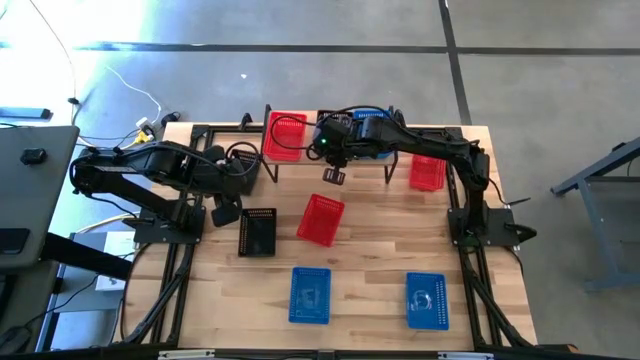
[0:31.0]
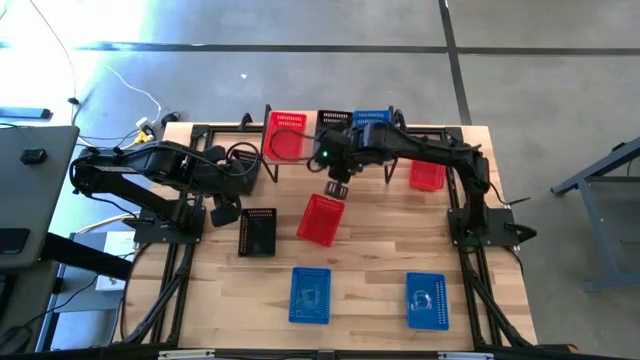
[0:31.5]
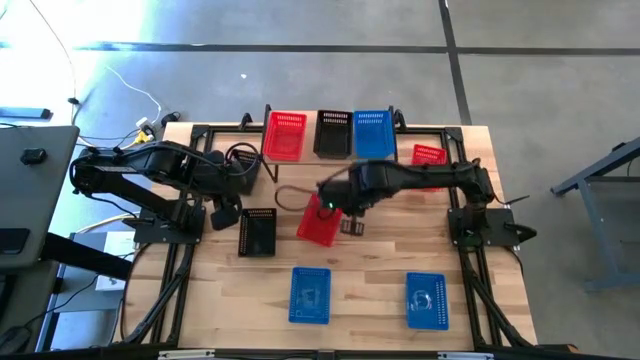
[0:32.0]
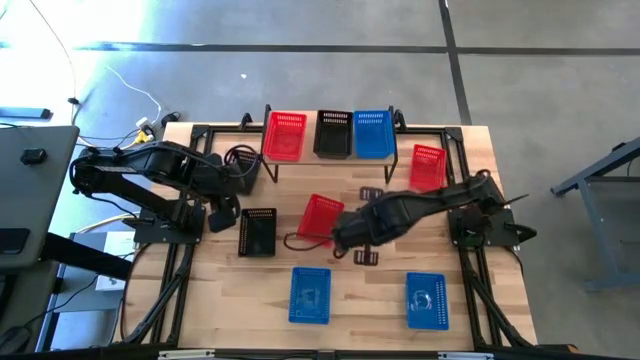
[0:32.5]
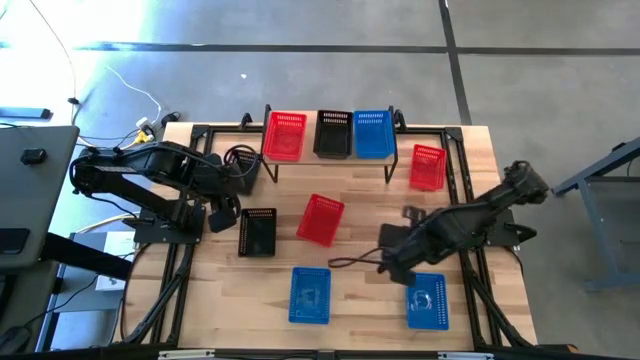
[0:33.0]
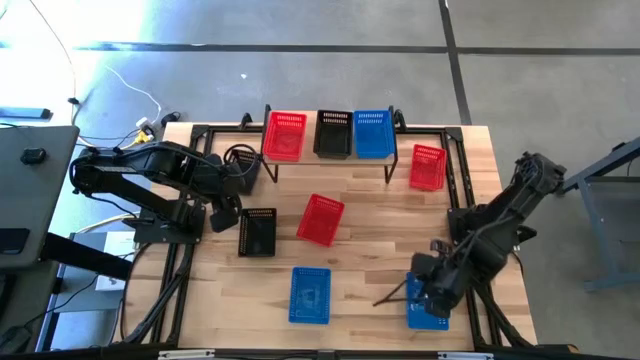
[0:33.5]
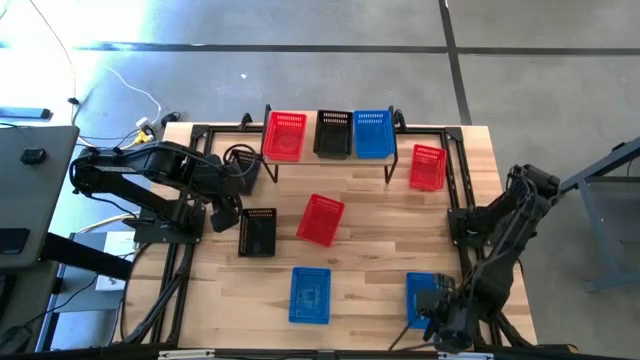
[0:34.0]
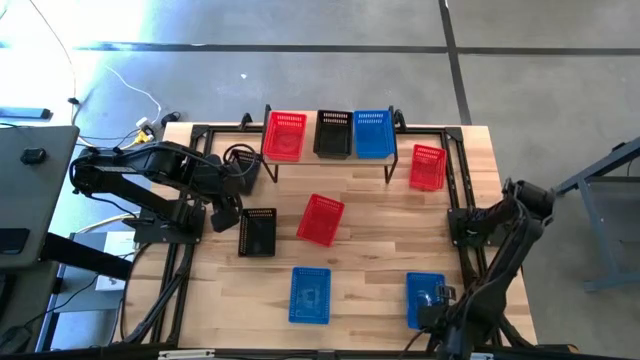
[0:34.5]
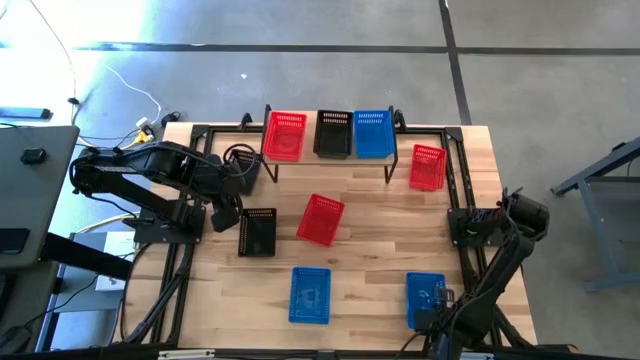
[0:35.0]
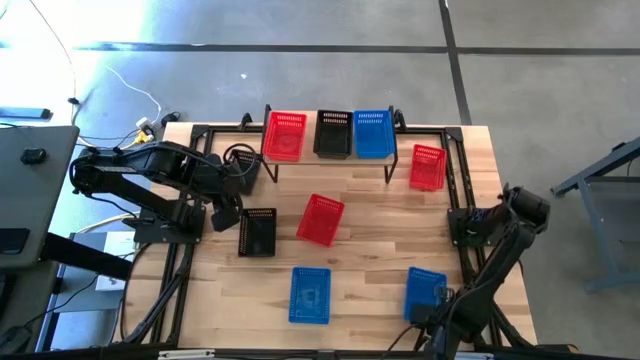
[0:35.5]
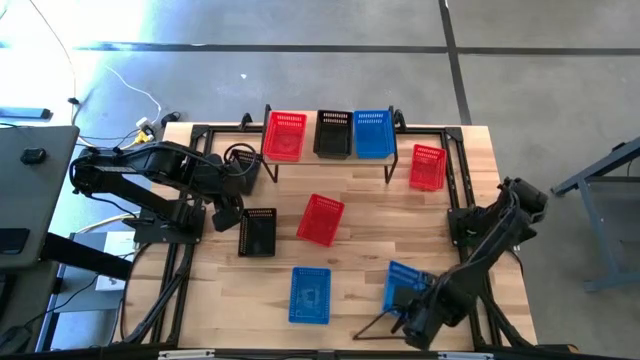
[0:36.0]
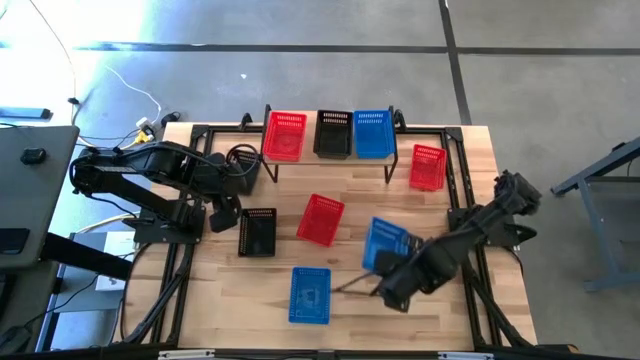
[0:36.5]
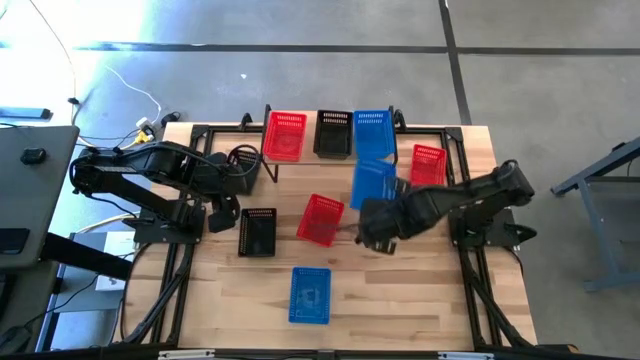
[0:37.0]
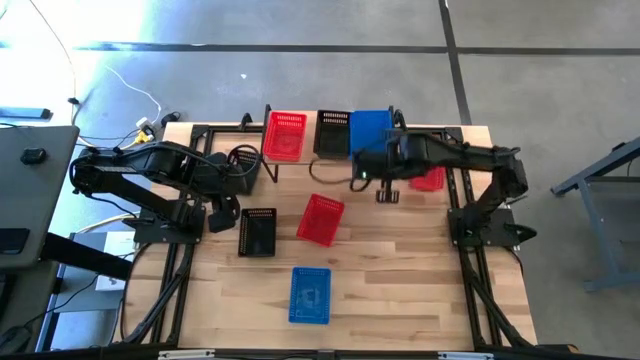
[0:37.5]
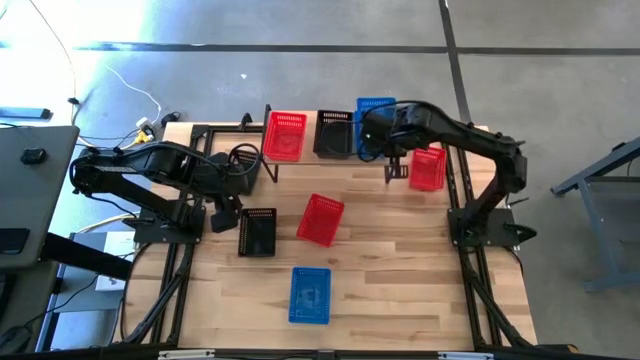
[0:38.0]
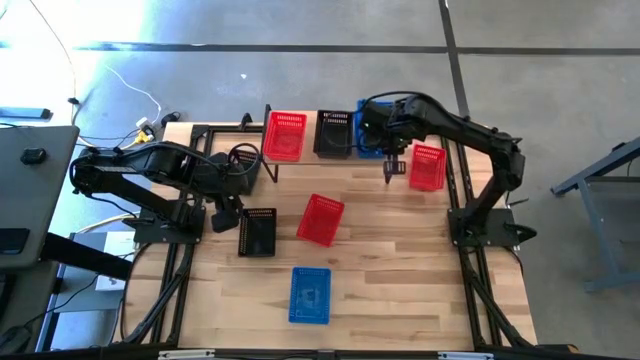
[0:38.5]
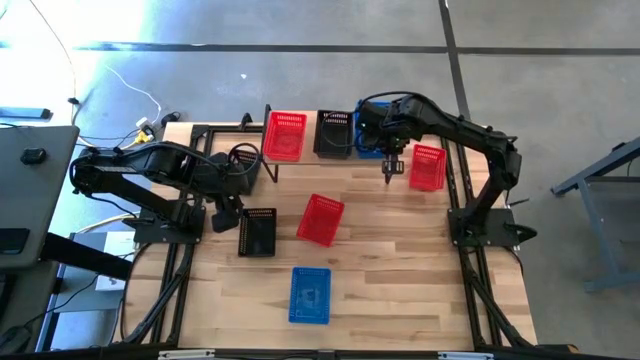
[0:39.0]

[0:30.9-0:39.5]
Task: Stack baskets on shelf by color
Stack the right blue bin on top of the blue bin on the shelf

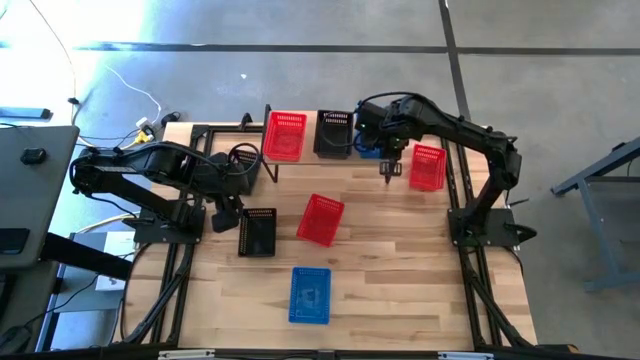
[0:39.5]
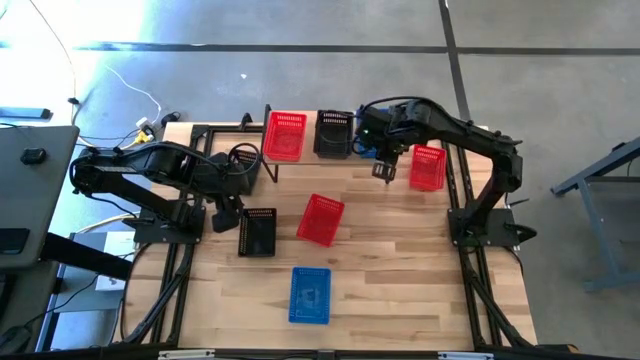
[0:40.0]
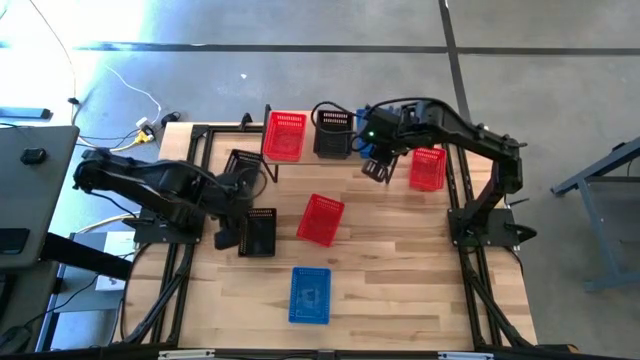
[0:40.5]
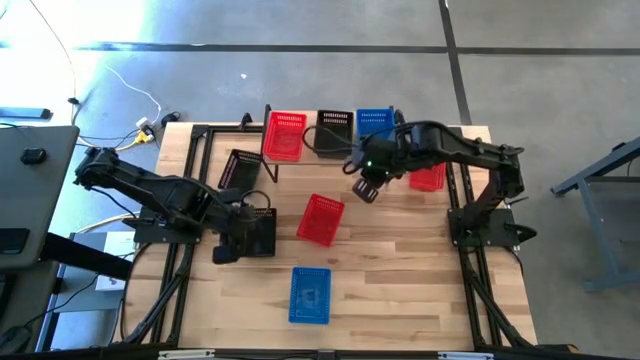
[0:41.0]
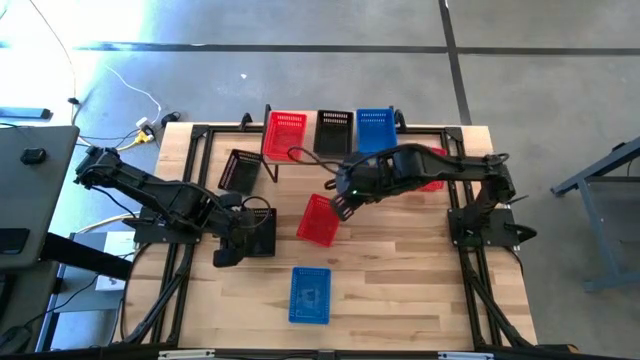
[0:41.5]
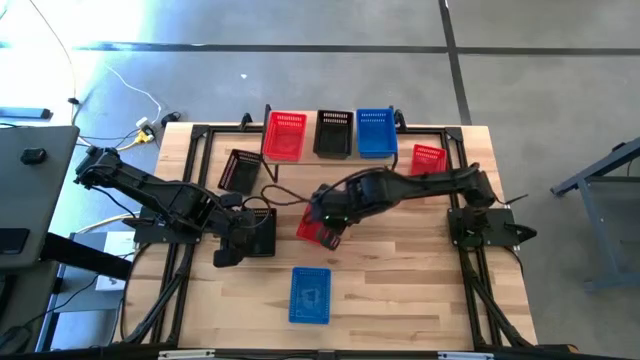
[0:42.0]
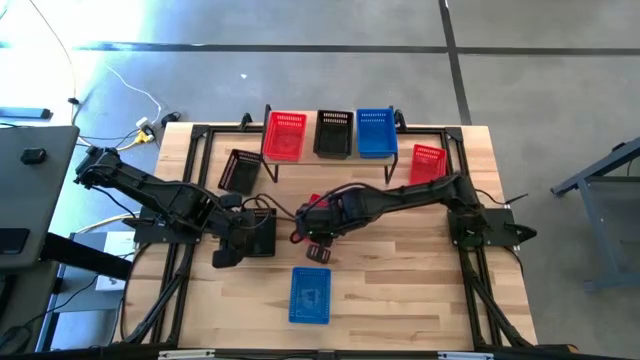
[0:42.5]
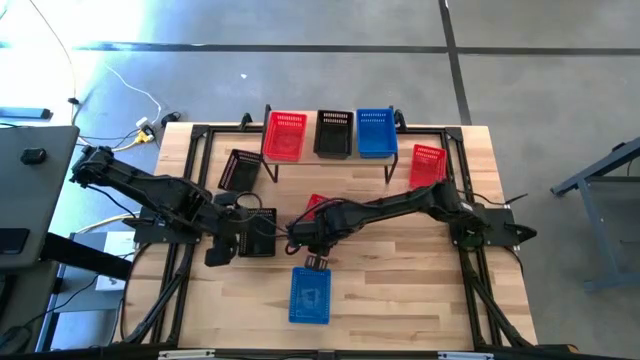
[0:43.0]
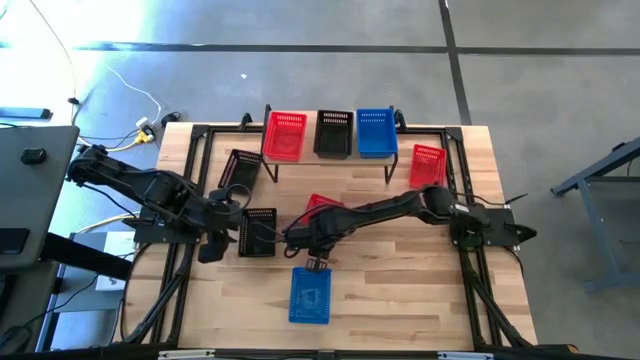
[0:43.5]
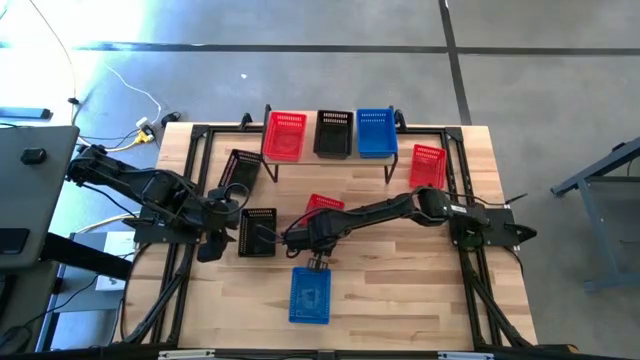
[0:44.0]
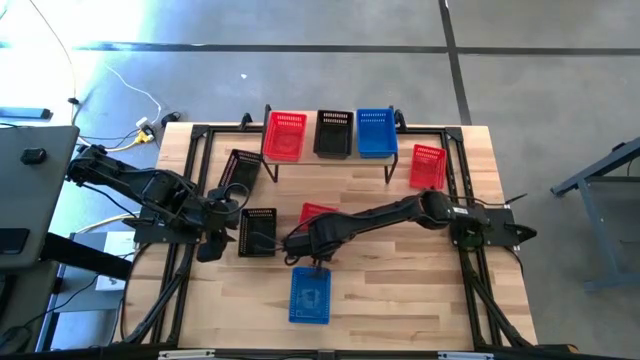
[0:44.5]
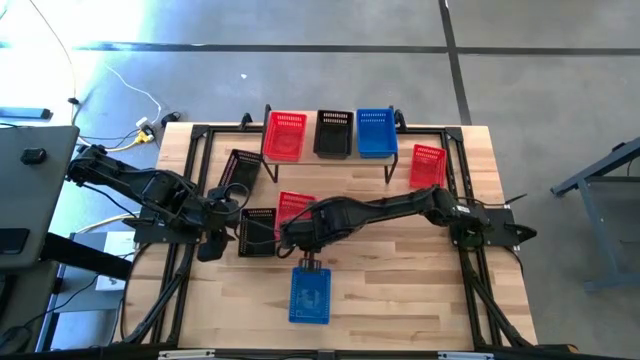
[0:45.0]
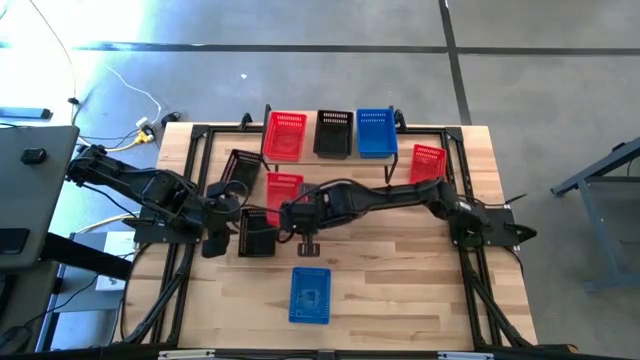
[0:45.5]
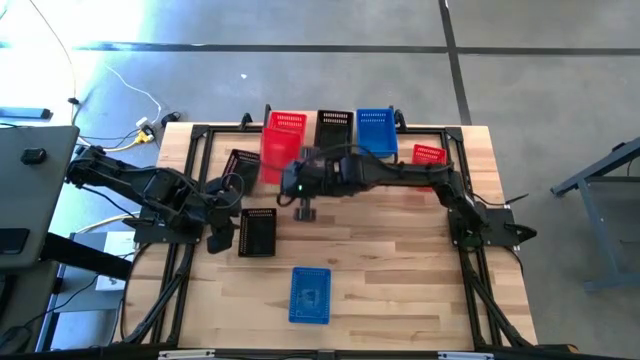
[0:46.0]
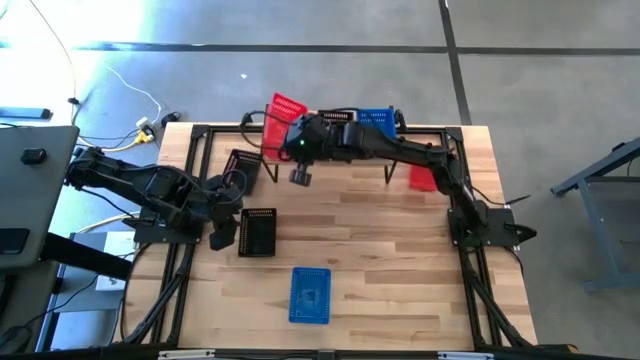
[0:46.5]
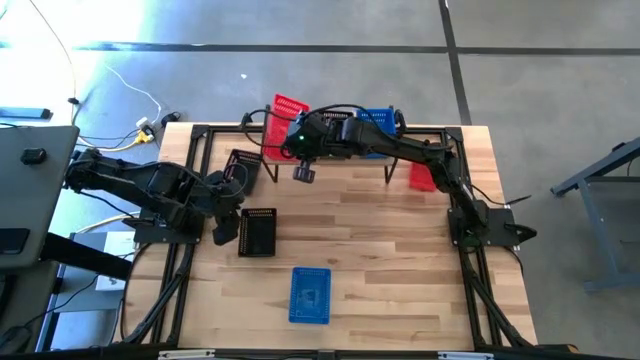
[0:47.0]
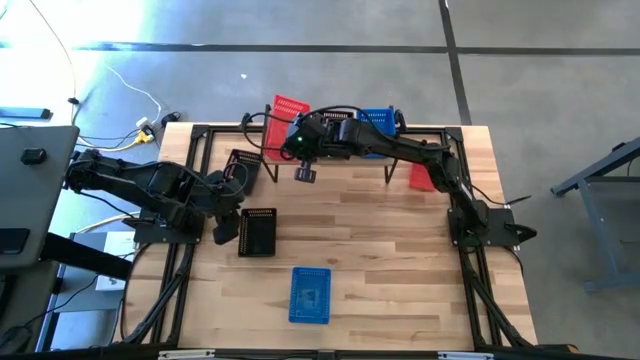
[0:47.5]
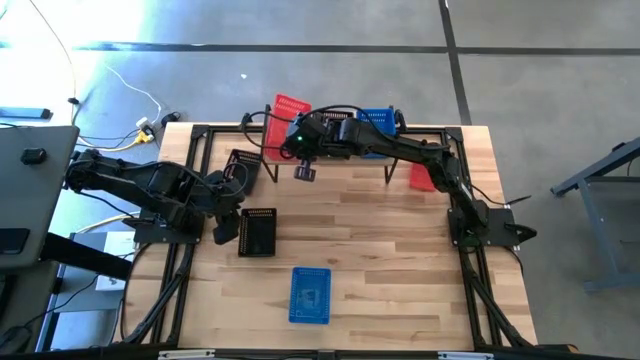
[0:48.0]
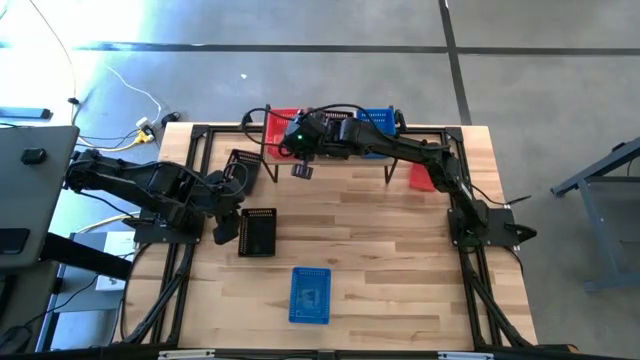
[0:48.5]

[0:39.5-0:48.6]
Stack the bottom red bin on top of the red bin on the shelf

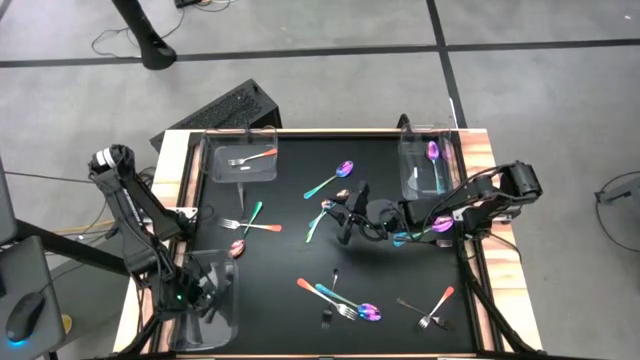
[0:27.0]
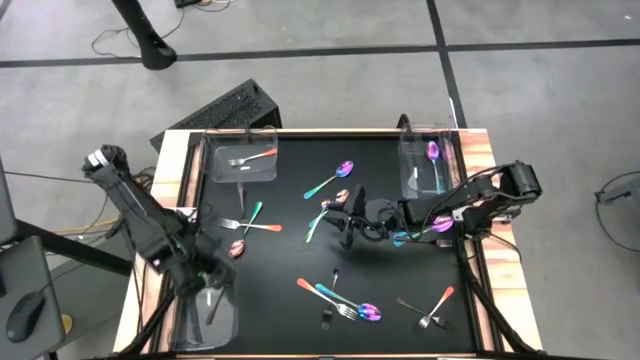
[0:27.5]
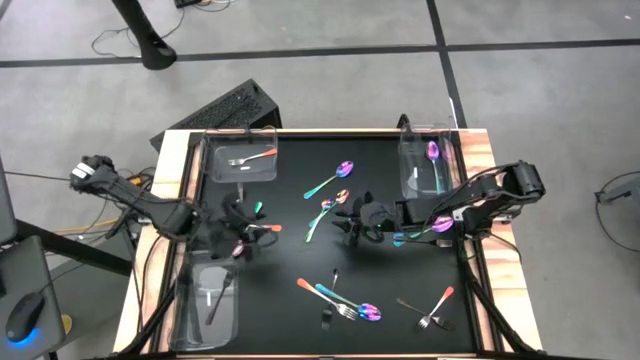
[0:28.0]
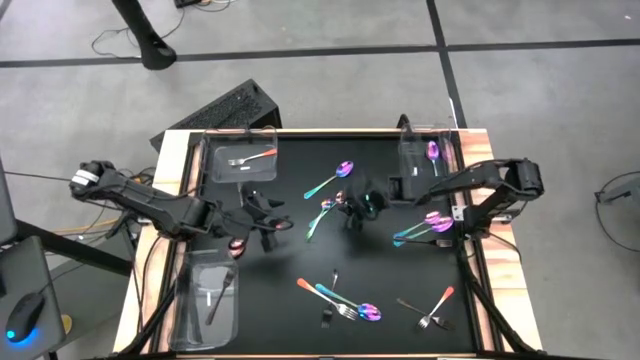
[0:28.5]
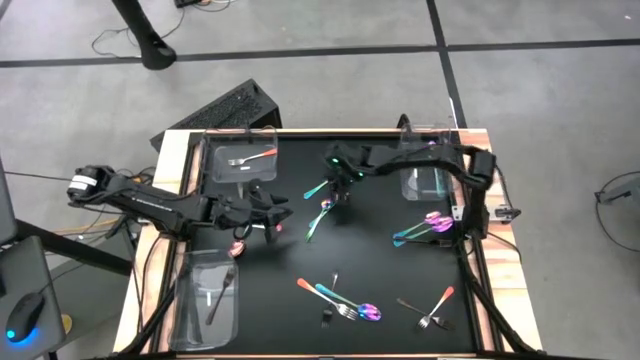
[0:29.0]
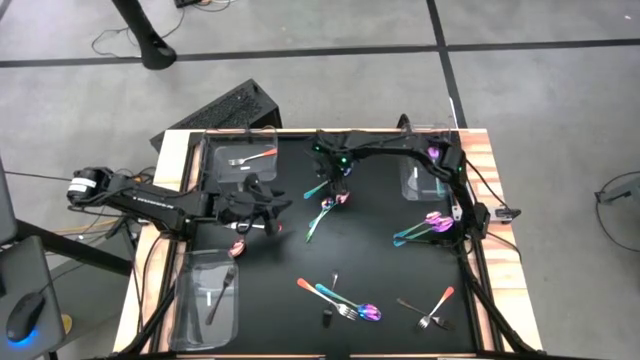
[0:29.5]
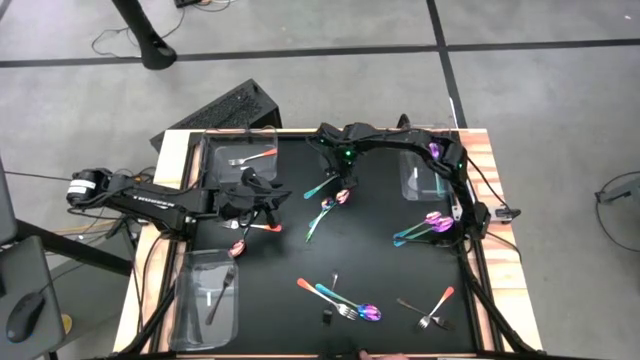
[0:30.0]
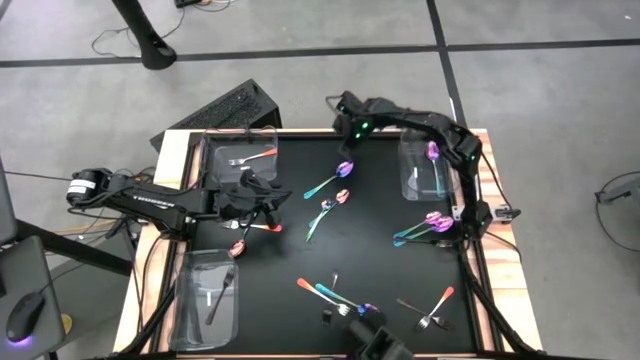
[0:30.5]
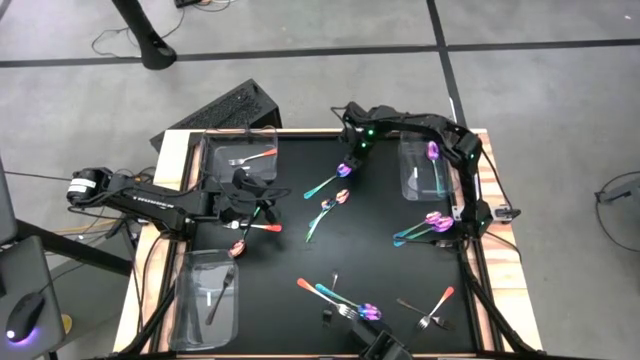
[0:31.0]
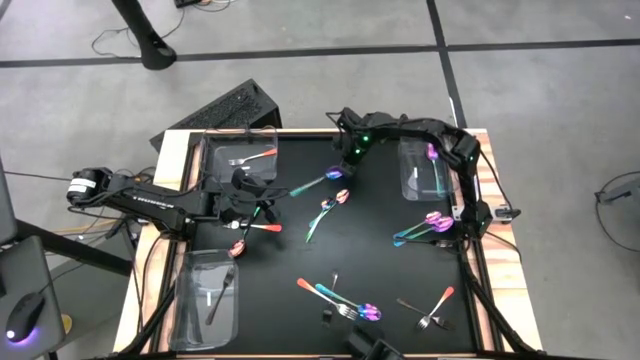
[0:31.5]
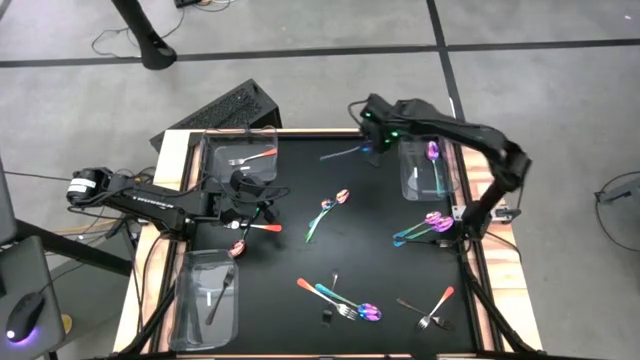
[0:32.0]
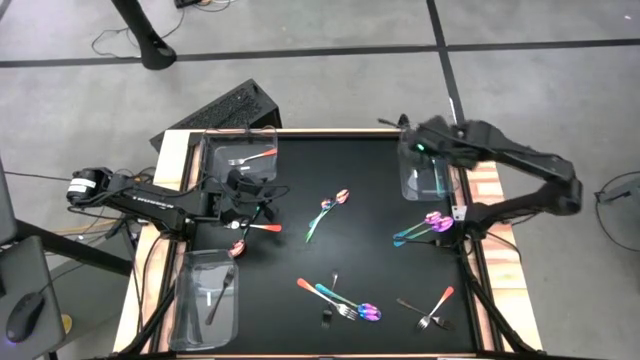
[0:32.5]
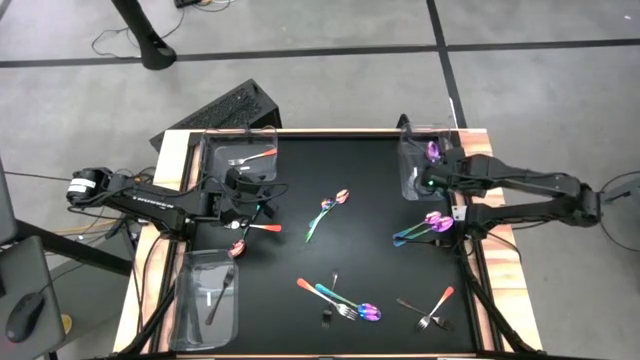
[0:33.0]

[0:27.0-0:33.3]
Task: Sort silverware by color (type)
Put the violet spoon into the top right transparent bin
